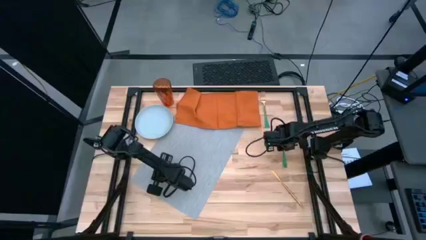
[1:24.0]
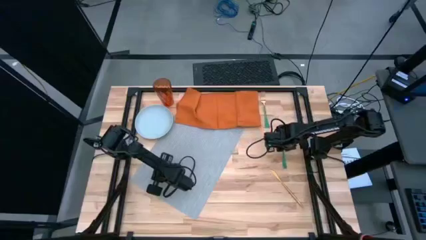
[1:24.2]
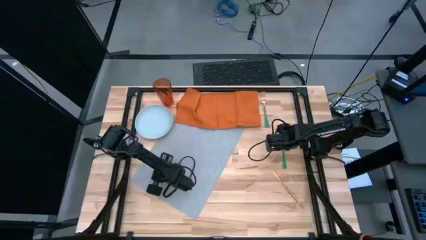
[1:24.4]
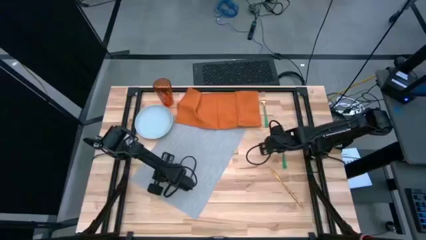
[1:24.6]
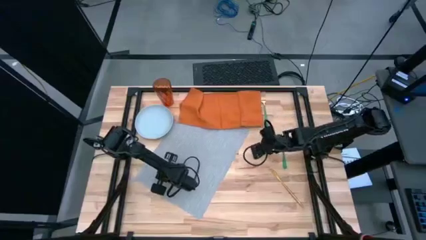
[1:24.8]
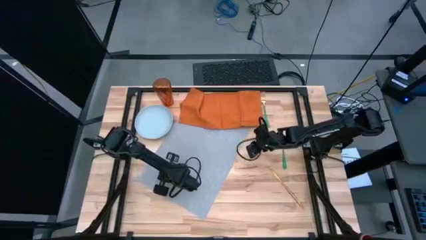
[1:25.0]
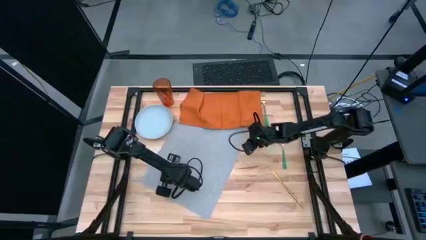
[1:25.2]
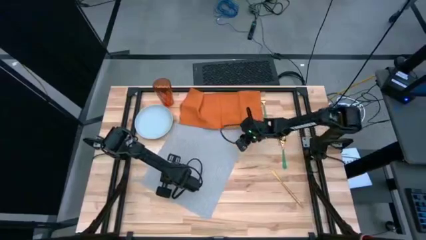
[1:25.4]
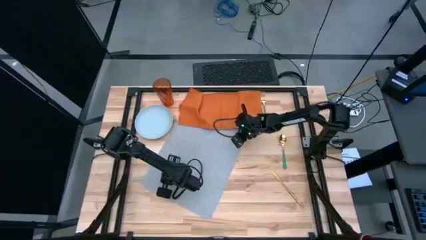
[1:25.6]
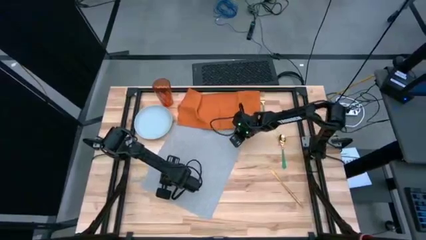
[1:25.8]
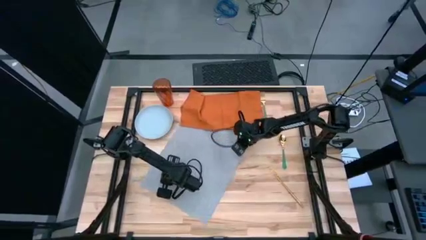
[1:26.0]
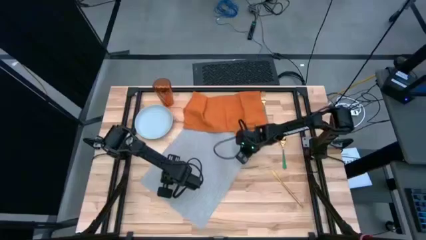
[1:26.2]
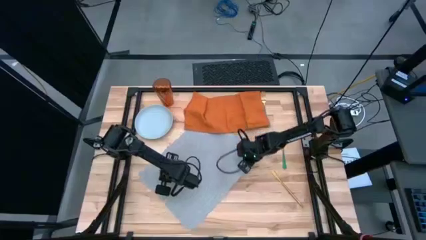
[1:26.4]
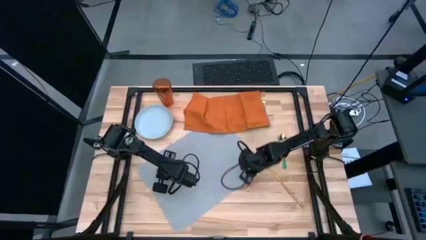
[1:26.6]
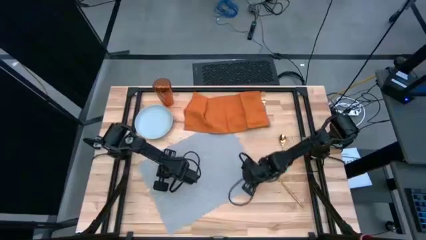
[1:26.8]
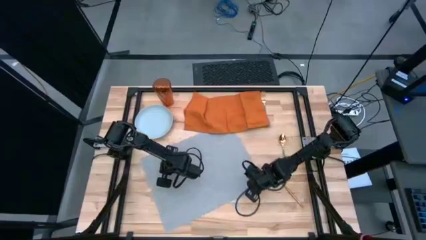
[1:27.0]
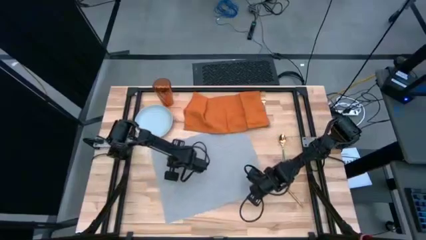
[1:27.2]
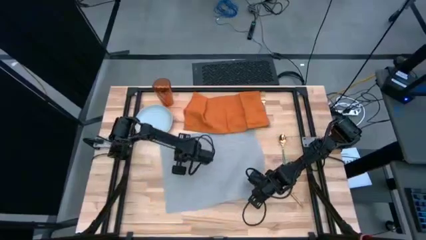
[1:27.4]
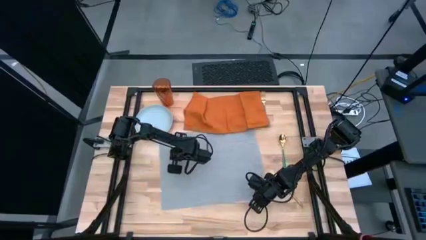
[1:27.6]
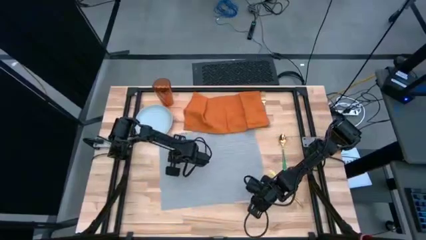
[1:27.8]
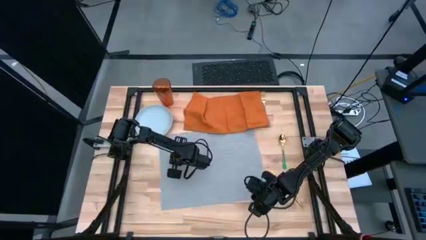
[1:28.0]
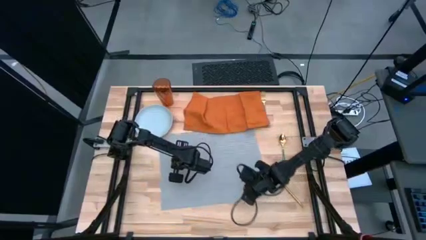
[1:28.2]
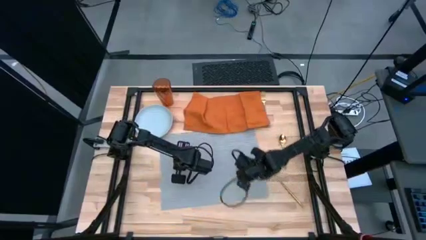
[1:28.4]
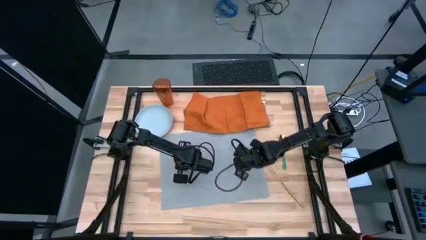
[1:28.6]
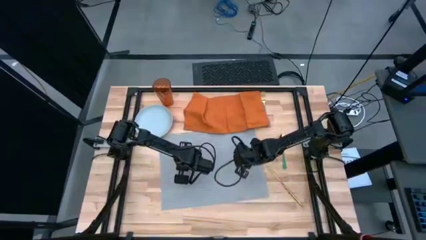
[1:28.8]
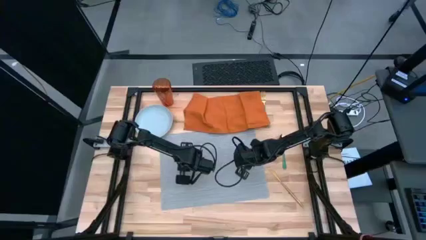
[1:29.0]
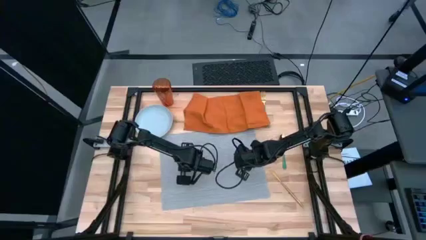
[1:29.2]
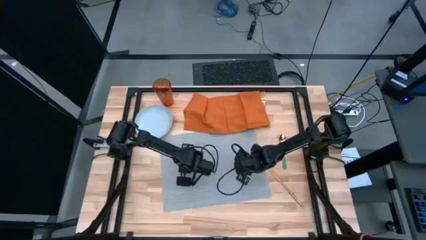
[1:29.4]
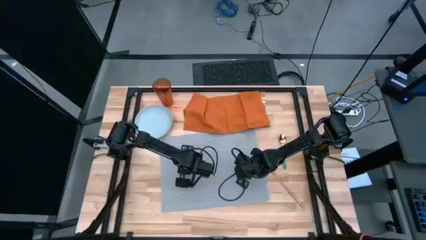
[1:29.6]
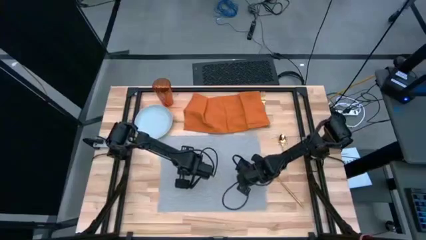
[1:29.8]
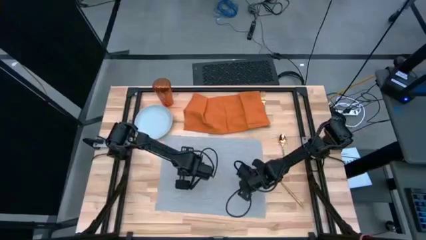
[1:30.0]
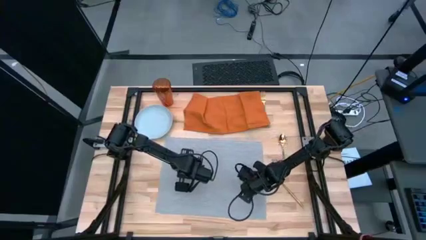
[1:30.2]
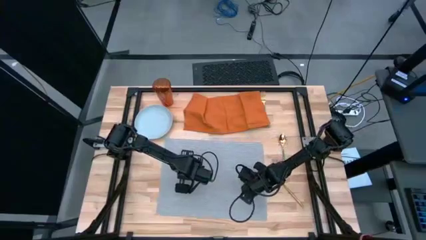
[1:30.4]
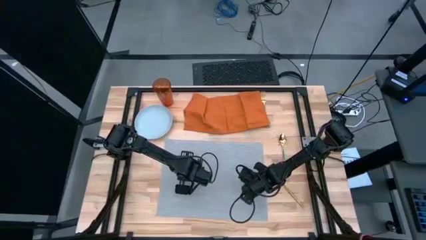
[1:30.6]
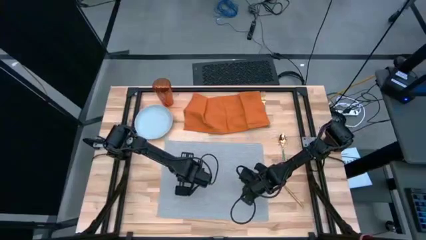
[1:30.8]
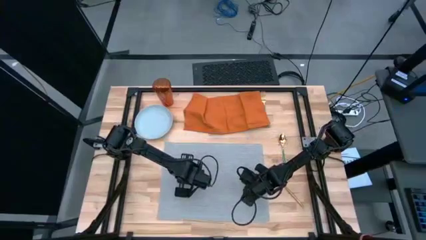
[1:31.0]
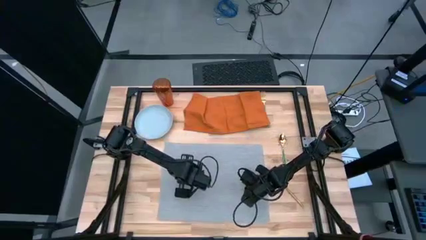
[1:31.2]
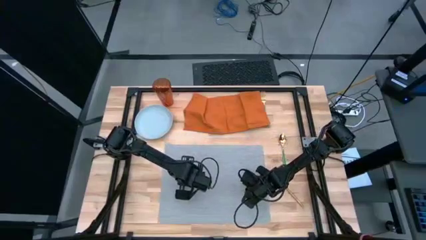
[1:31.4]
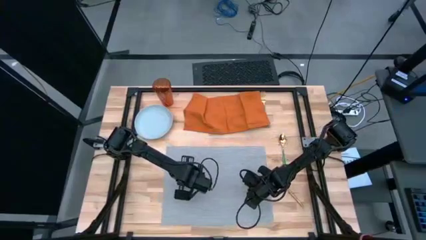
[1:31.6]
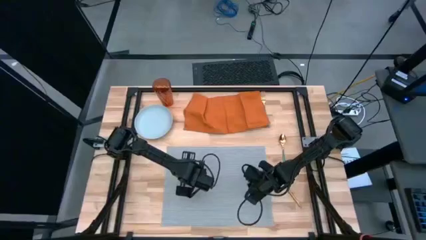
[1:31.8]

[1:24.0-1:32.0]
Task: Set table place
Adjust the grey placemat

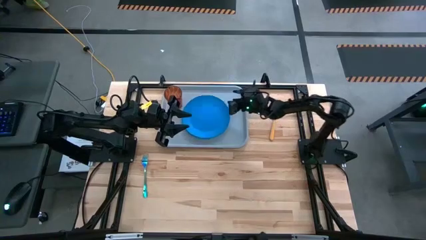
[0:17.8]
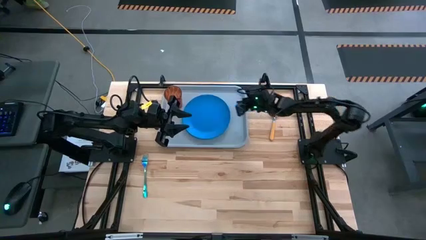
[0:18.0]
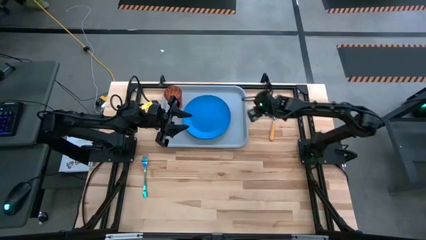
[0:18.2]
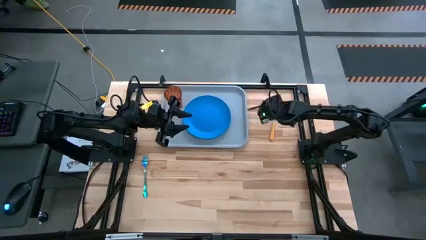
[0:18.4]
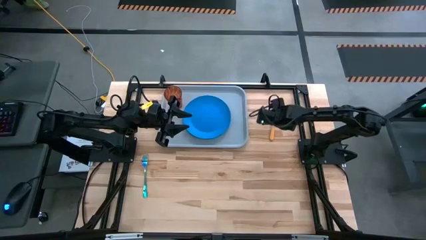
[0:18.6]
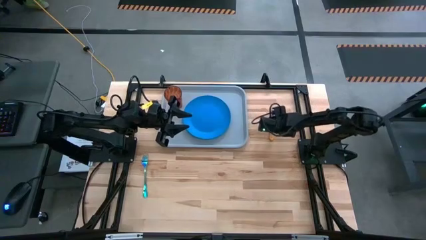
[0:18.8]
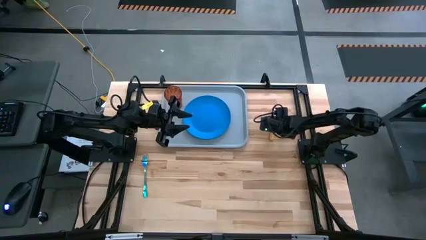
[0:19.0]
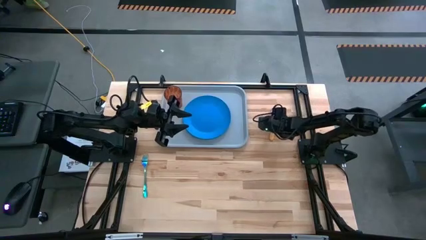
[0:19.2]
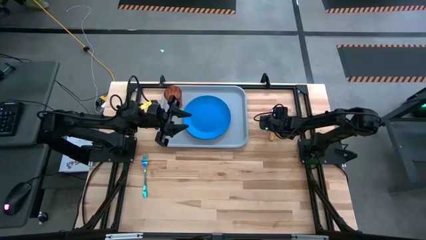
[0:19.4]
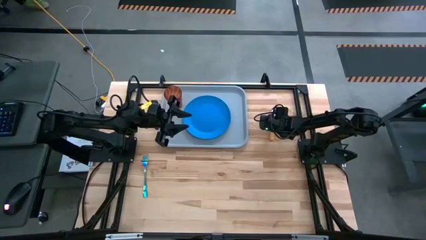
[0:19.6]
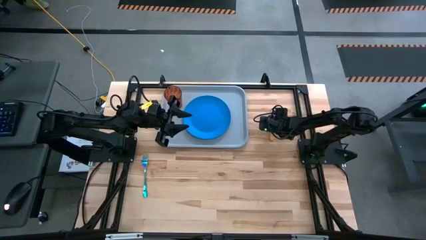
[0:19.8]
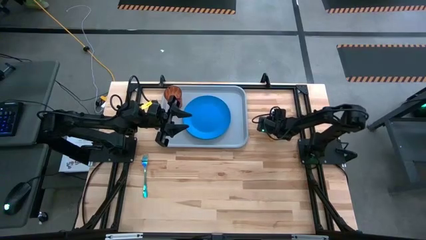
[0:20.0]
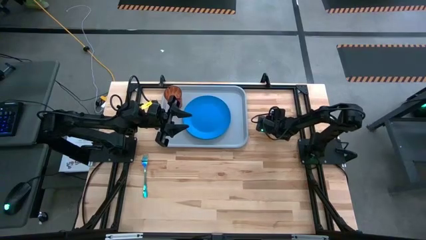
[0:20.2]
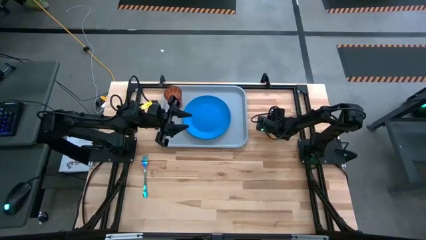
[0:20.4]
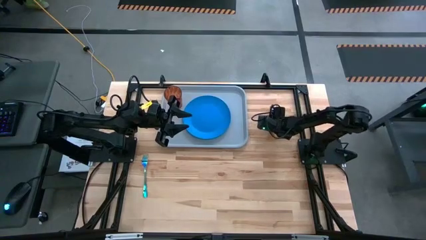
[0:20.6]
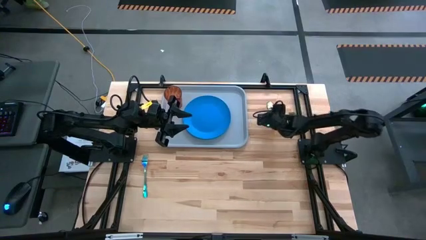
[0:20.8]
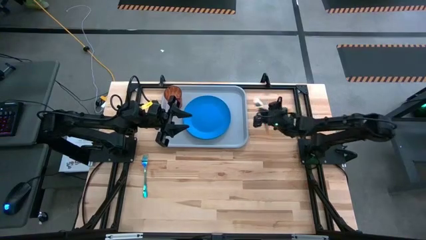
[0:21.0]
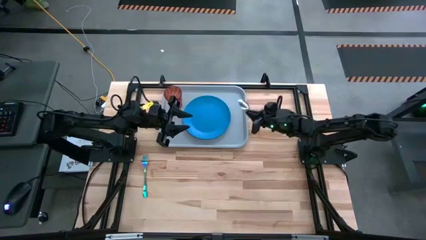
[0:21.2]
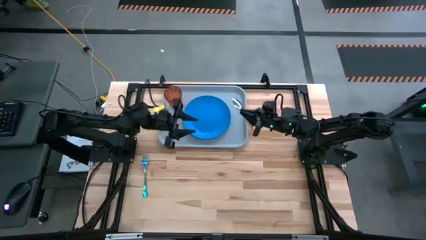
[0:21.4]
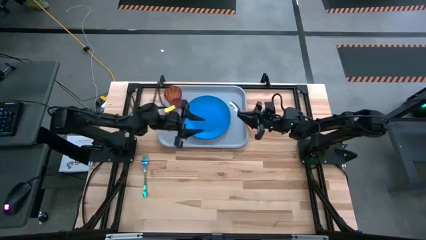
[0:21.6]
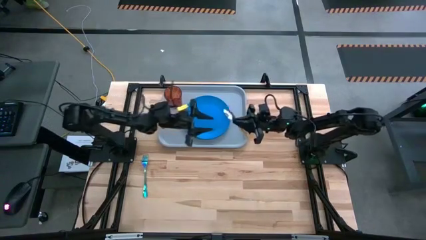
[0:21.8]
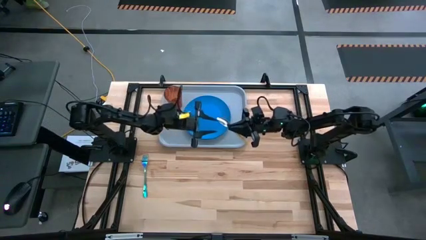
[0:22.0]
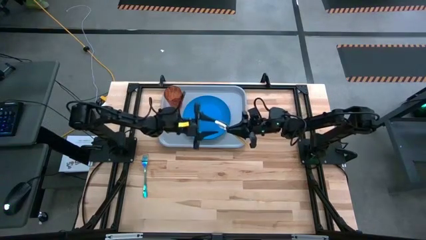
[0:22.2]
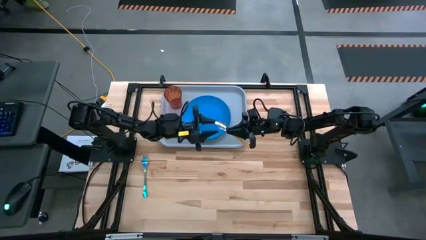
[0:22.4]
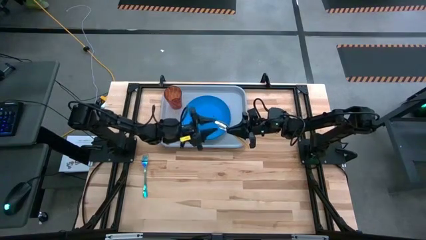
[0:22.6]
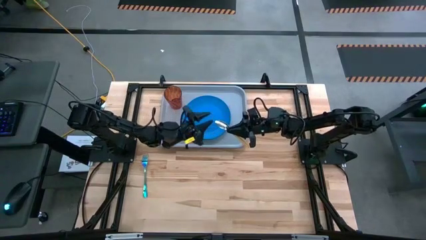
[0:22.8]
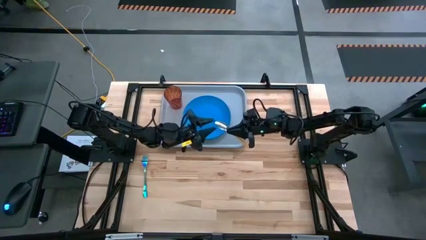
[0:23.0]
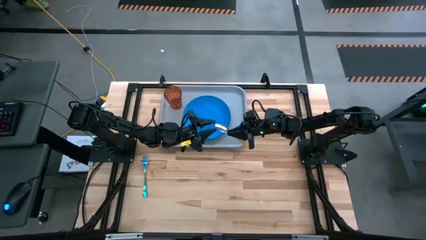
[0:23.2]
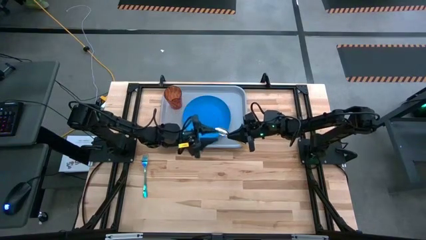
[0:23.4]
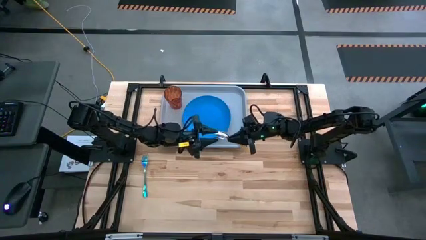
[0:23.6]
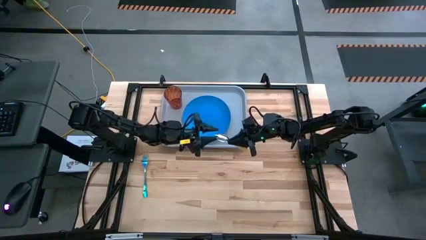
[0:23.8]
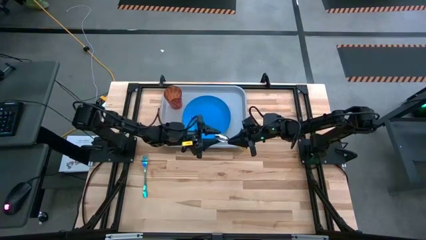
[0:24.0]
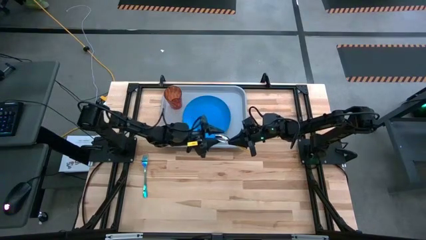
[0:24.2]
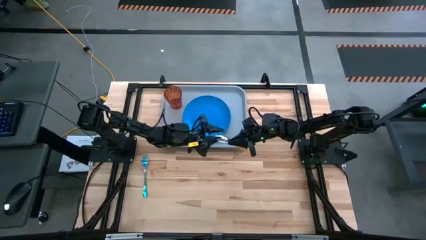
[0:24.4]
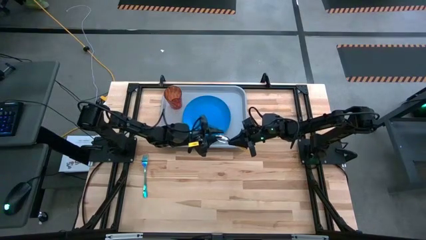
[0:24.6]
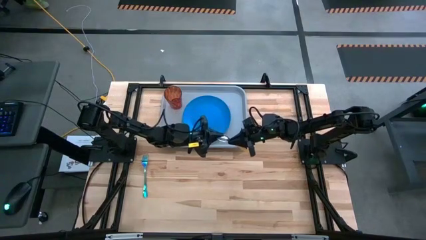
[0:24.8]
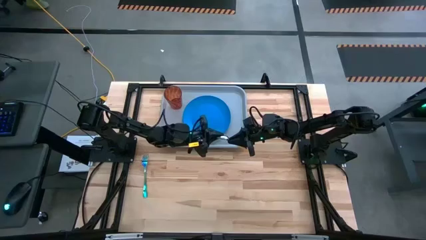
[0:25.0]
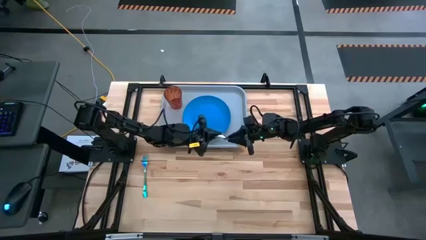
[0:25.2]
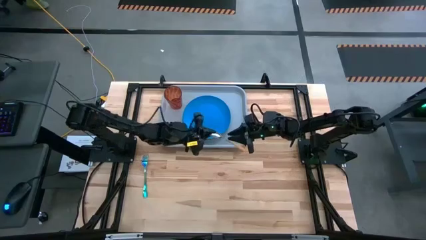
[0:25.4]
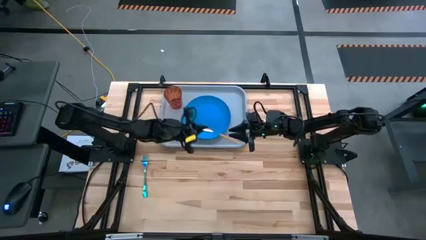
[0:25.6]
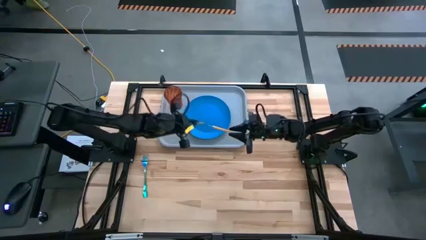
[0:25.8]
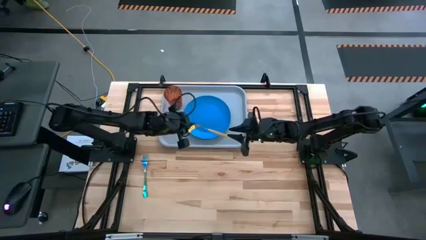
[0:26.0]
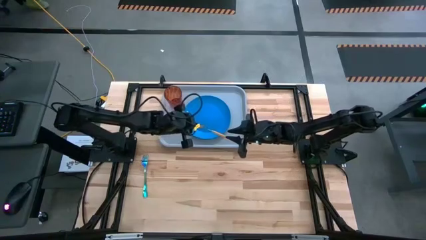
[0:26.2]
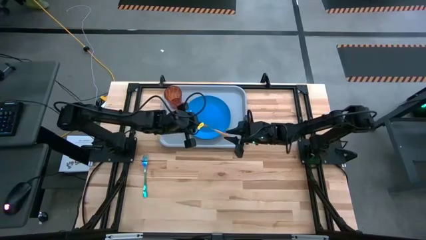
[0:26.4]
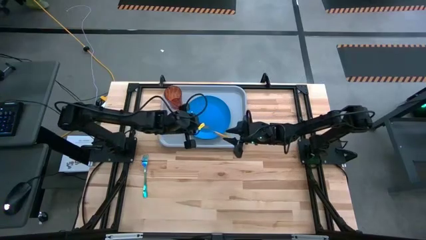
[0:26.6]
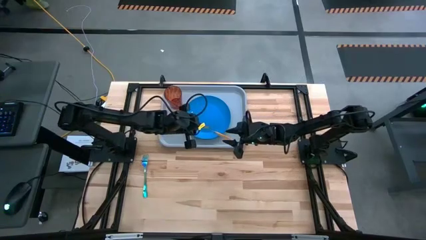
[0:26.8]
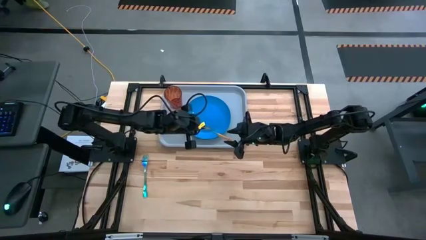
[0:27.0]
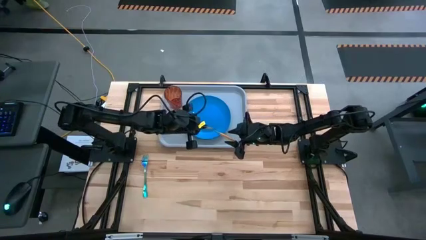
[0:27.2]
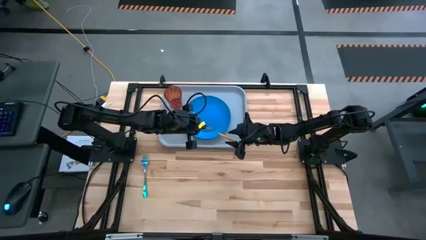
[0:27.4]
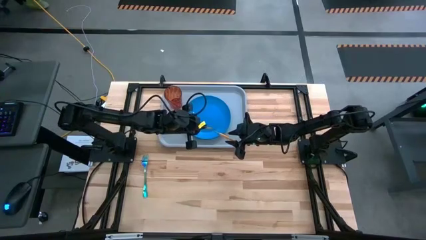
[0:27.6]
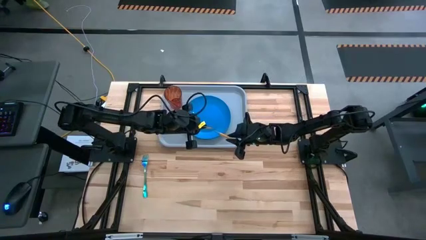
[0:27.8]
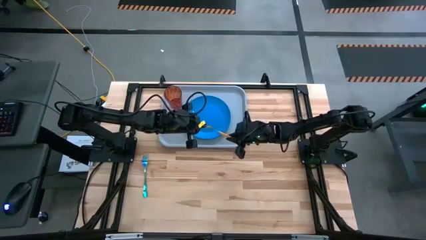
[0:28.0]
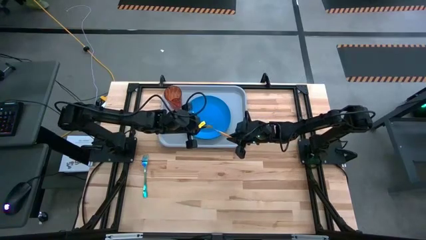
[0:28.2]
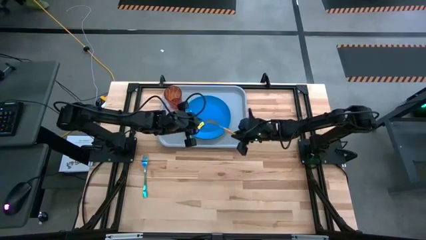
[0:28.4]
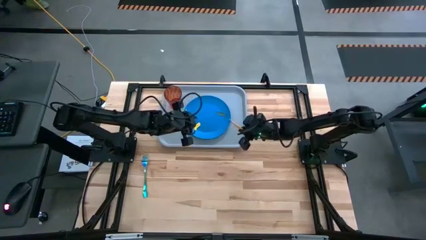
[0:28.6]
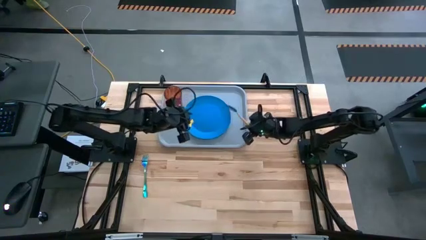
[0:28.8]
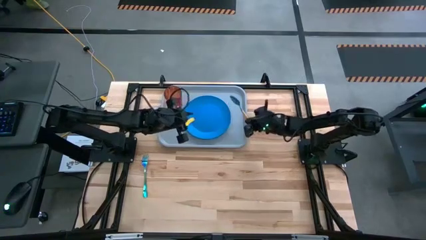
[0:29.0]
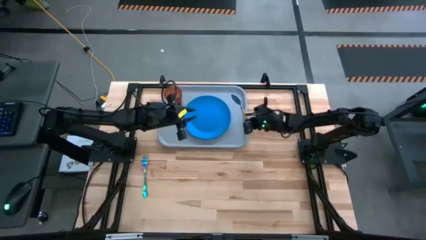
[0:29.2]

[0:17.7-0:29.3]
Task: Pick and place plate/cup/fork/spoon on tray
Put the yellow spoon on the gray serving tray to the right of the blue plate
